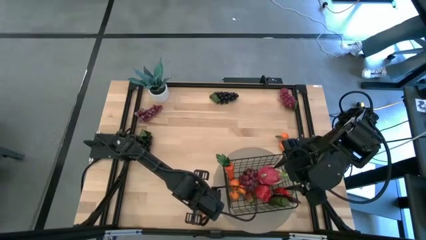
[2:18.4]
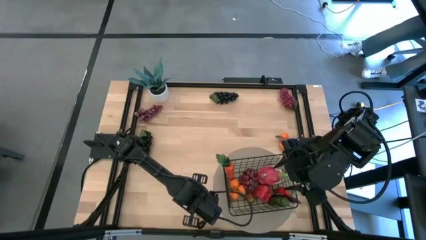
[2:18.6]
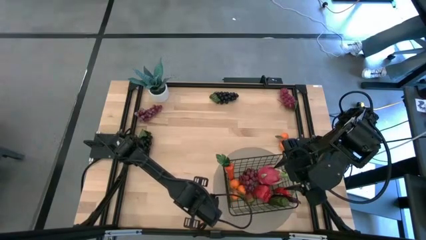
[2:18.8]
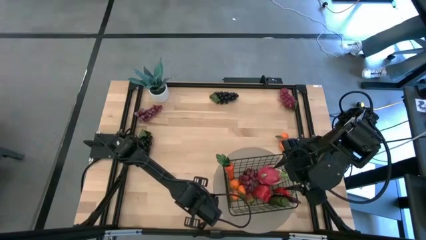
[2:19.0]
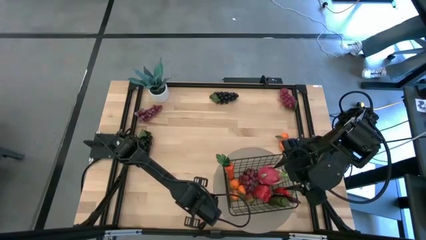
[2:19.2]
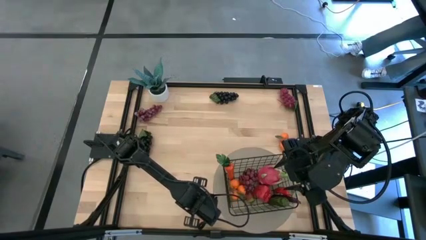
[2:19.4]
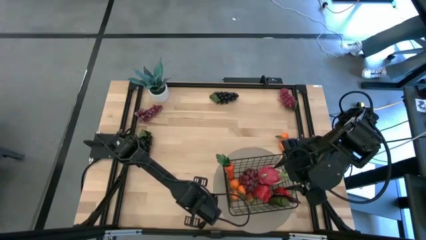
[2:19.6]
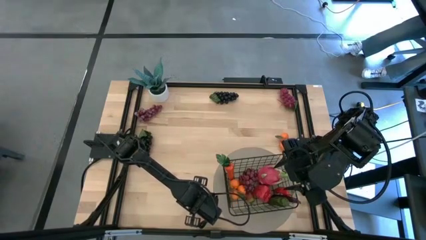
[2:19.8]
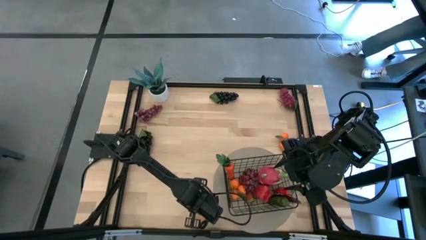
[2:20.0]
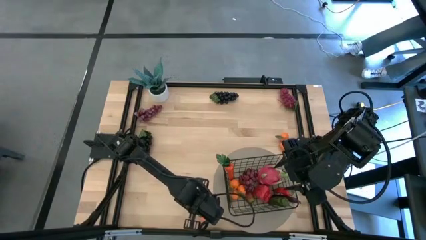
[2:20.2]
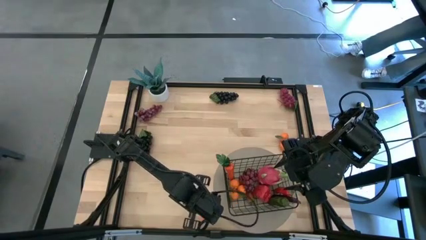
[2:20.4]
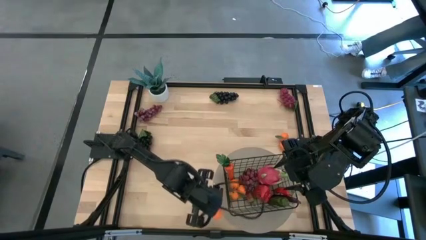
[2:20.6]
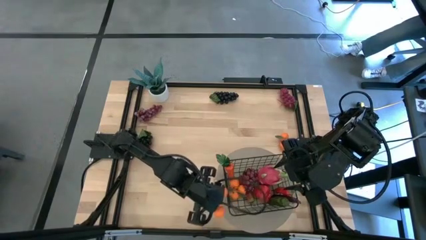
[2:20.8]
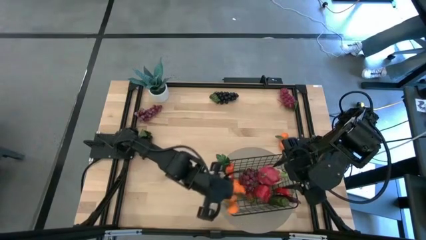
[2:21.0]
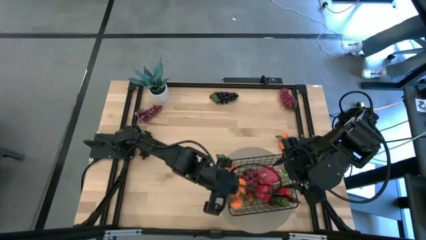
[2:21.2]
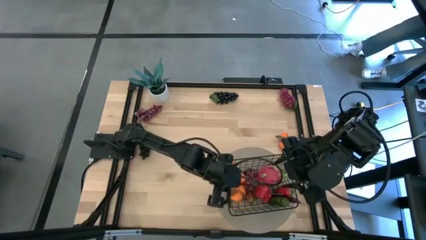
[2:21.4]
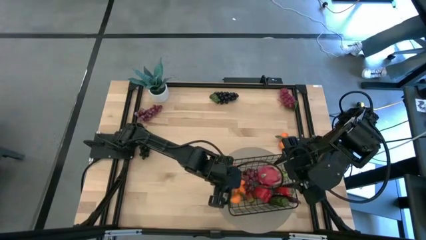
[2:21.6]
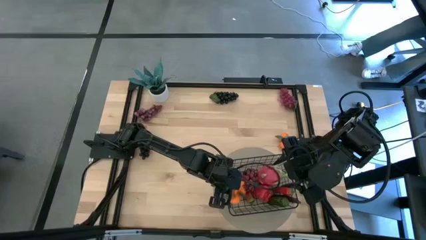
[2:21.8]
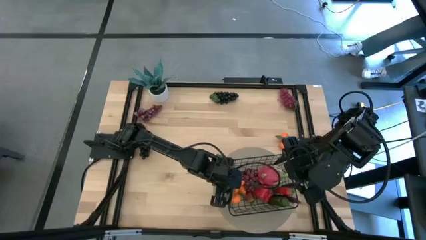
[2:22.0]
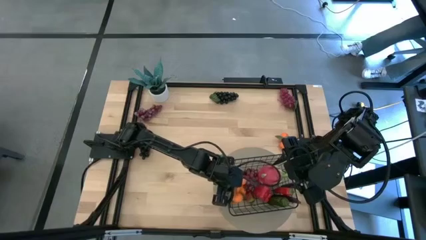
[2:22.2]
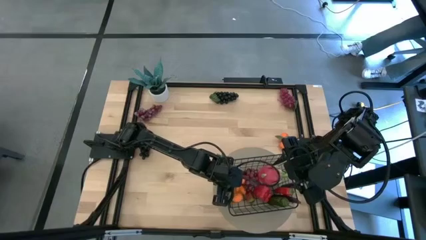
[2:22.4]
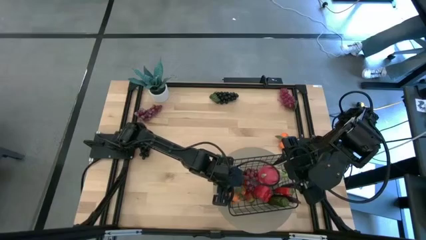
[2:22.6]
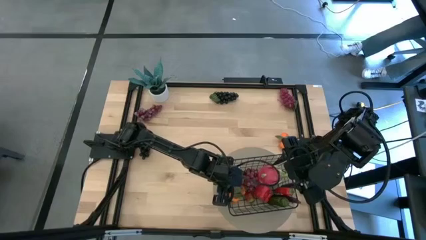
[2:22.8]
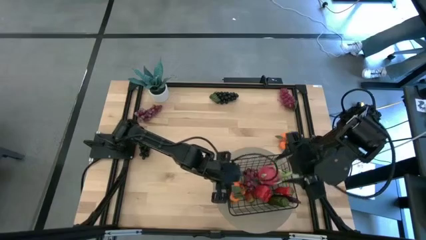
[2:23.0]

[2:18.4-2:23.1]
Task: Build produce basket
Put the bottom center orange into the wire basket

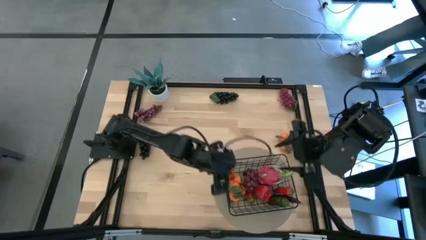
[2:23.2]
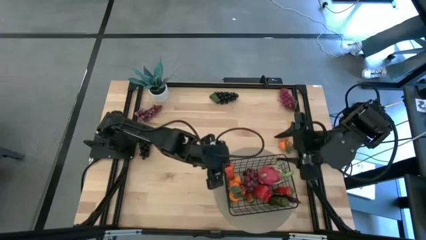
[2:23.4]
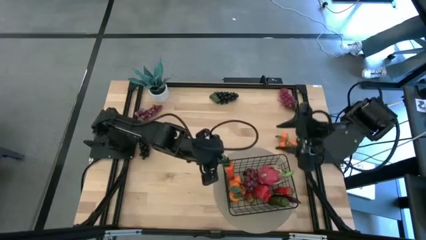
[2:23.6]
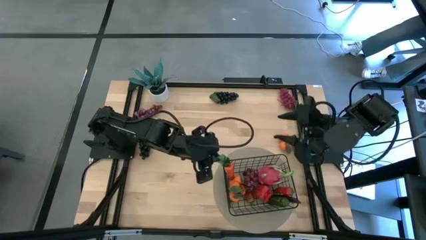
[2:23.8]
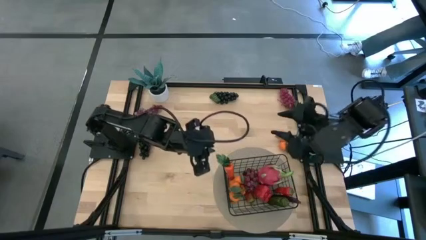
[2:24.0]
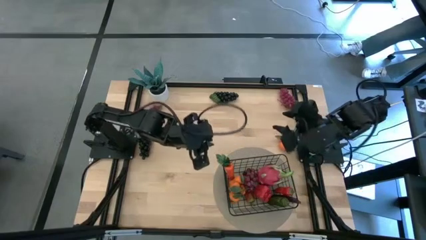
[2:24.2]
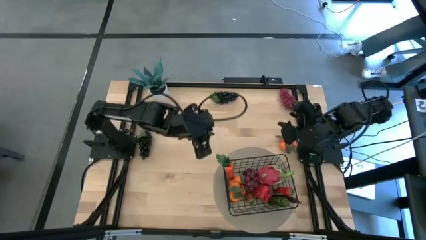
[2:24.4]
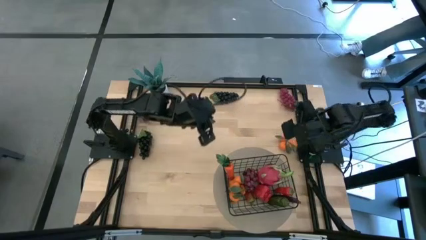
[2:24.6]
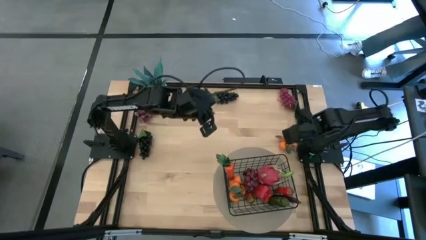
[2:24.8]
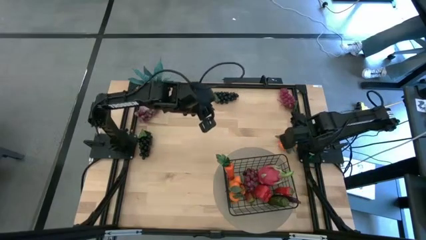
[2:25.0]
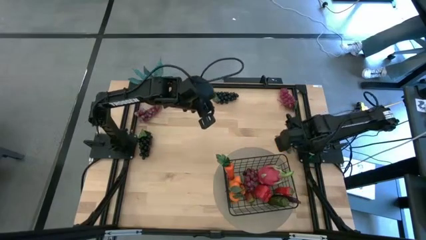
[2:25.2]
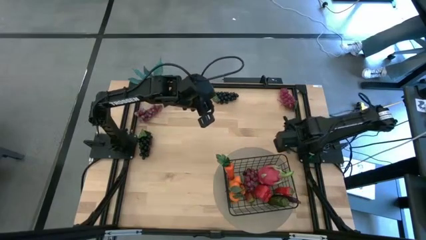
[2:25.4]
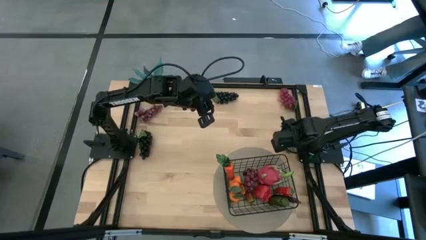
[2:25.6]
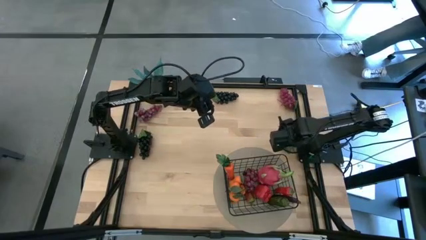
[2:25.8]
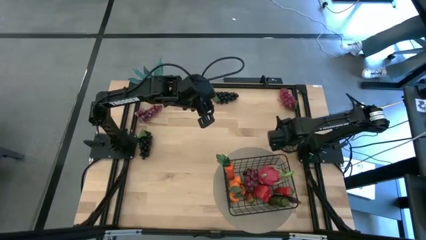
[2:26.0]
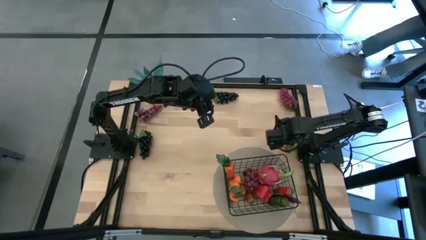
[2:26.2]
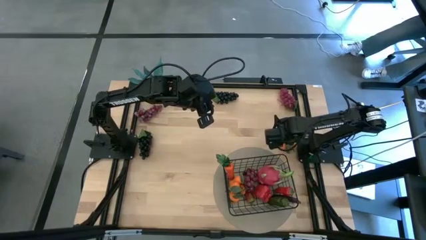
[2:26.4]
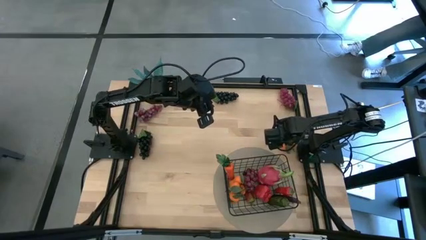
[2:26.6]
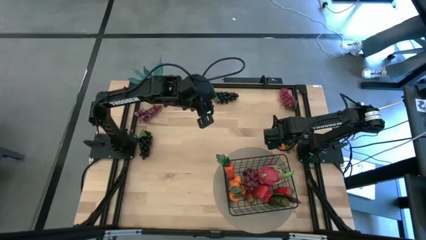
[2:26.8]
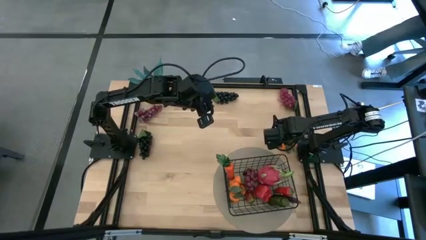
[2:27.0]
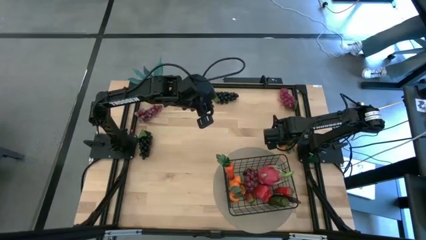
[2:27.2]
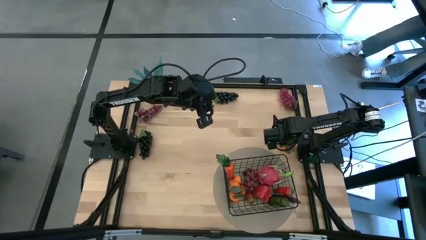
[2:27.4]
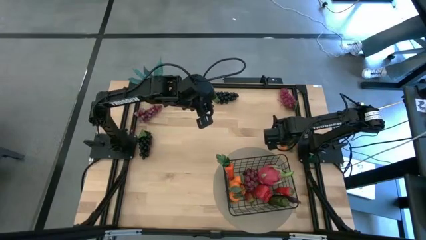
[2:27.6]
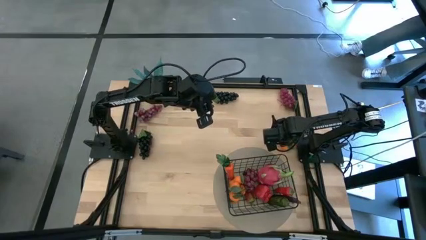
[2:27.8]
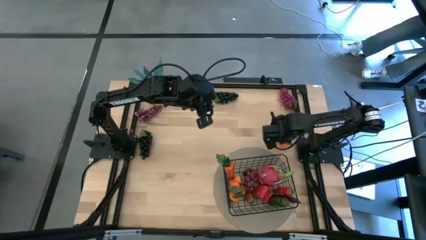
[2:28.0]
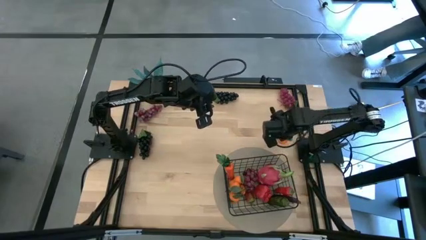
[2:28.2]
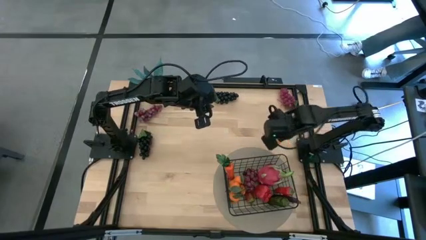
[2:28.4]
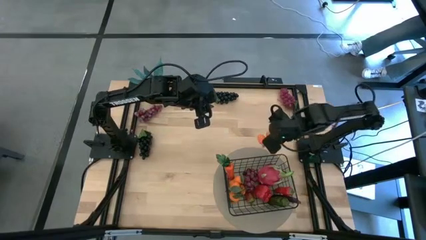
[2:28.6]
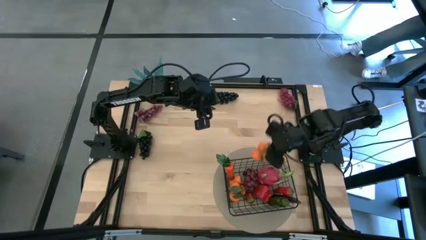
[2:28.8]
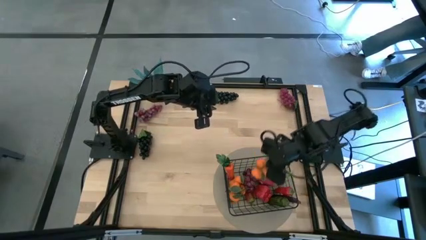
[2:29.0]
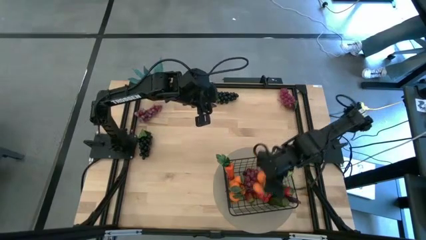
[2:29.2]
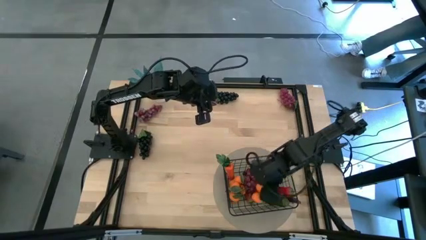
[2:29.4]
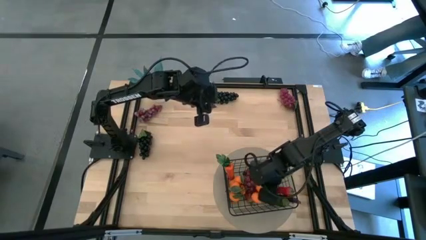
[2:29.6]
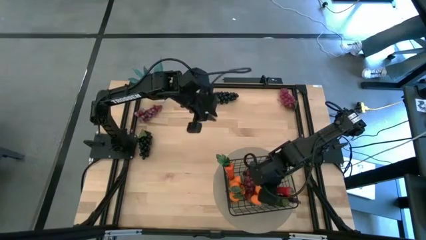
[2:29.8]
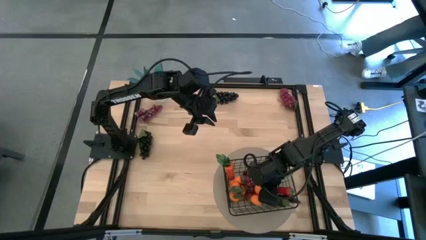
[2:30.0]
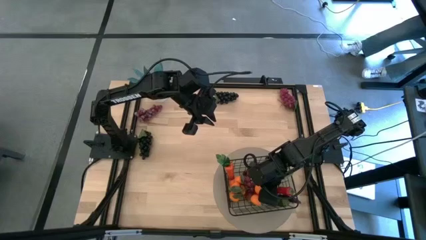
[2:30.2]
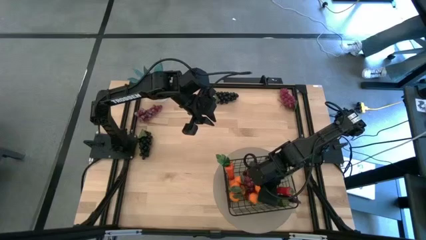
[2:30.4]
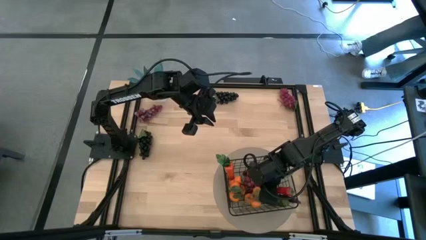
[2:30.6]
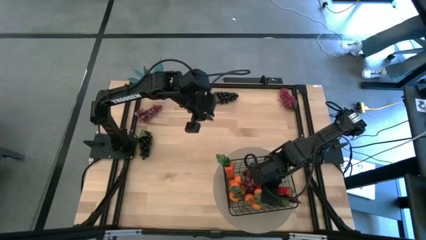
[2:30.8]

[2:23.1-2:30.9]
Put the middle right orange into the wire basket

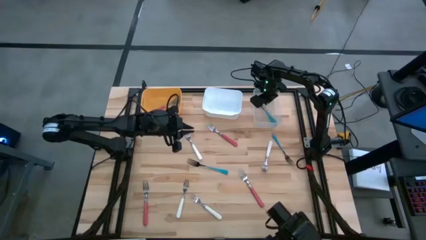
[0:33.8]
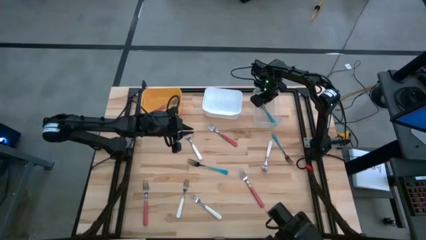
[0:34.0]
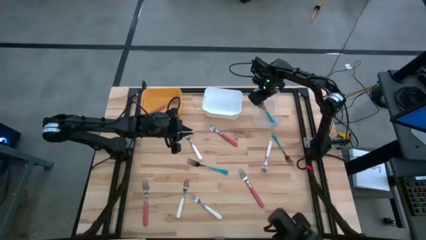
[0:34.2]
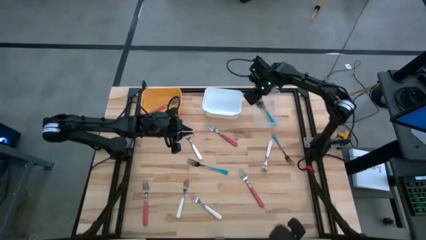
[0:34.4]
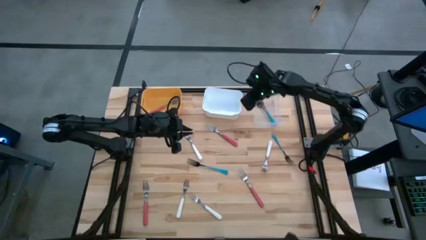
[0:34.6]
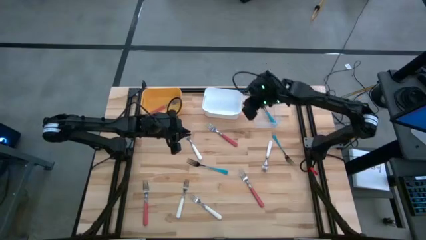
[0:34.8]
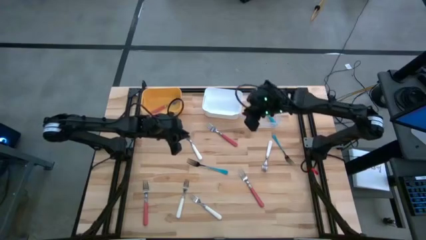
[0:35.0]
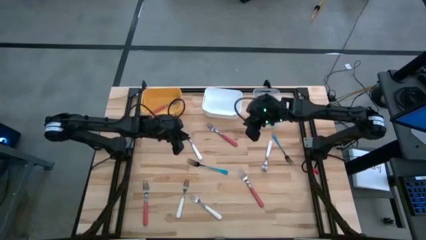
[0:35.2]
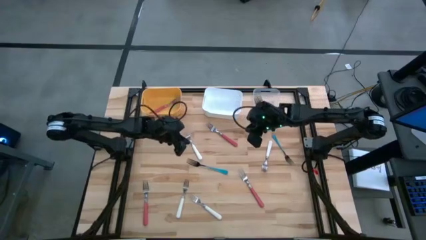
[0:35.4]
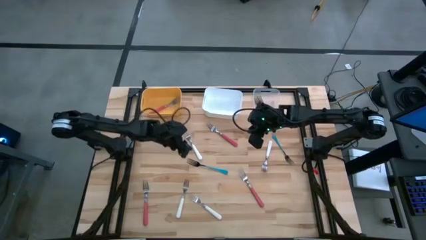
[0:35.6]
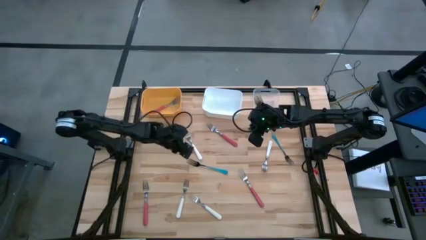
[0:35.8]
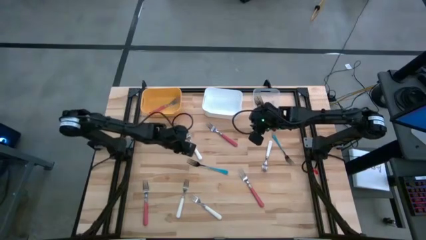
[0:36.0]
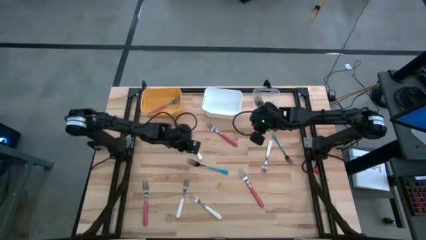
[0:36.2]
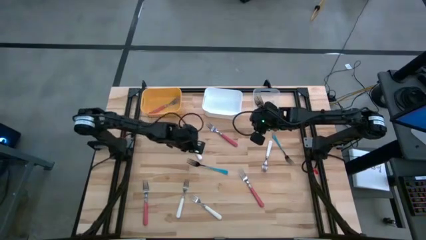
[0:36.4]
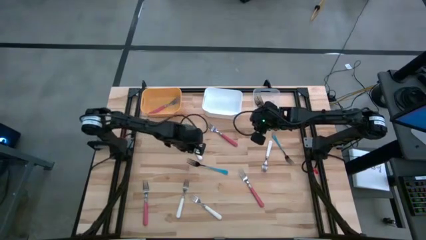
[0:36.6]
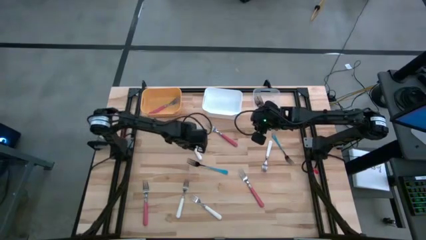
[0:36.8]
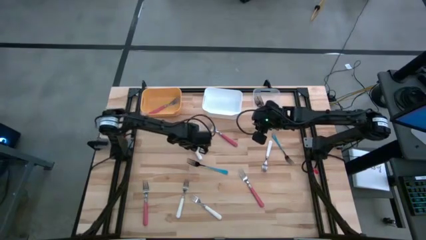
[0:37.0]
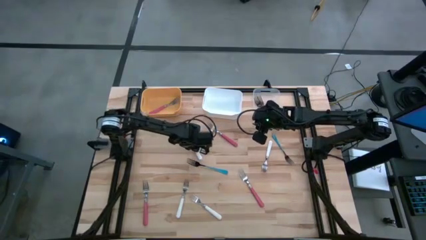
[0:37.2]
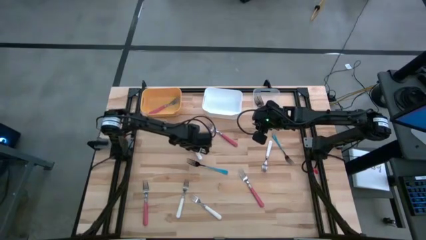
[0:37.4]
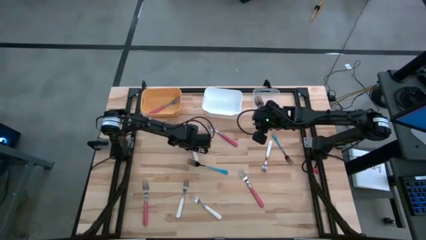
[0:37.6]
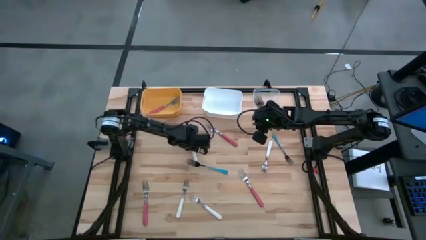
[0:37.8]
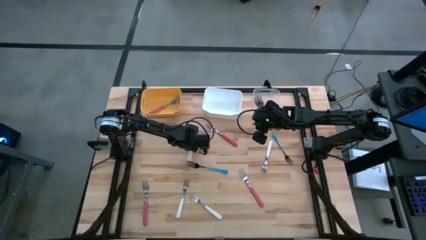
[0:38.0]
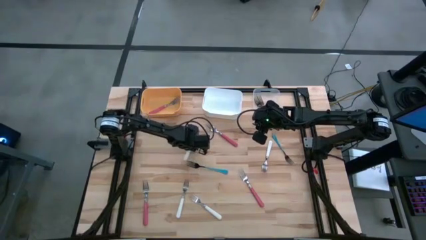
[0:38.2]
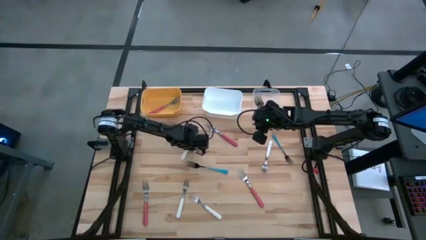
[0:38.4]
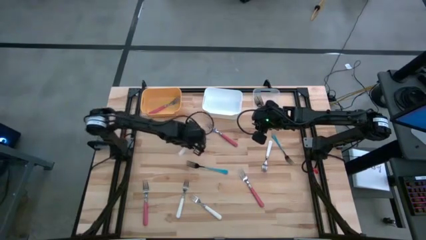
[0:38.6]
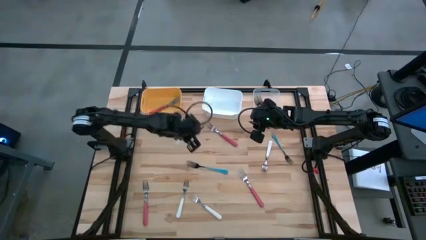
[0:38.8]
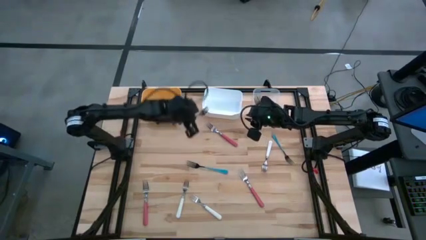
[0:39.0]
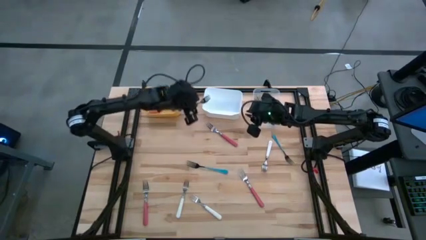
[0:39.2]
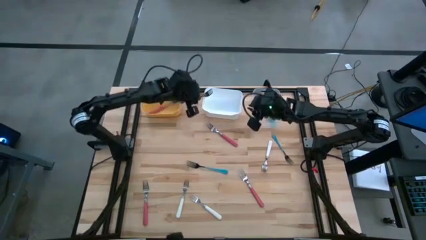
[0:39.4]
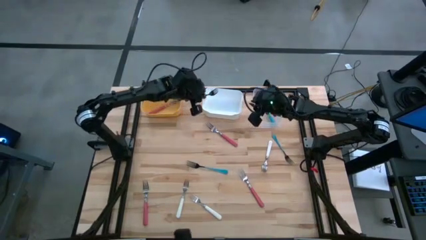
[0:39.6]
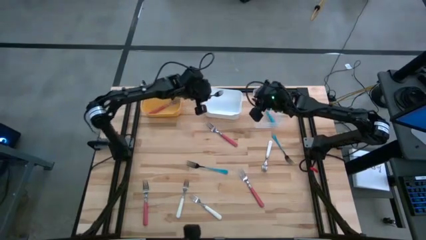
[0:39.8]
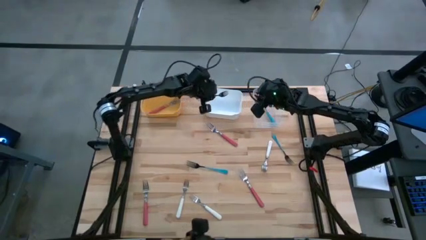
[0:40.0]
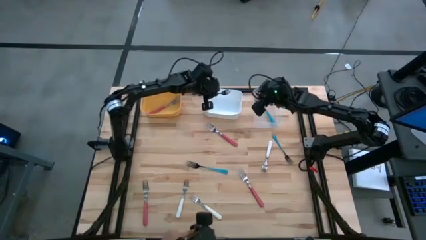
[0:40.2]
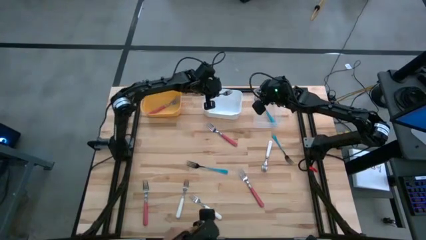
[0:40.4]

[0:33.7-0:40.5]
Task: Sort silverware by color (type)
Put the white fork into the white bin
